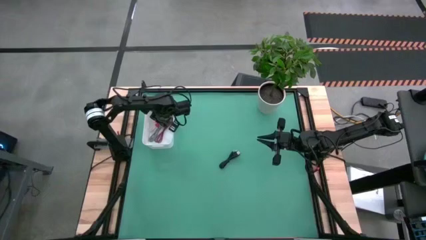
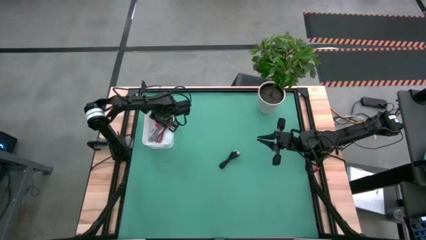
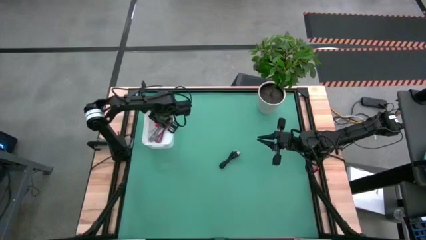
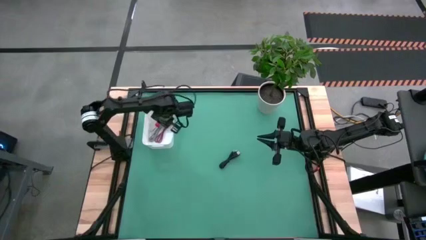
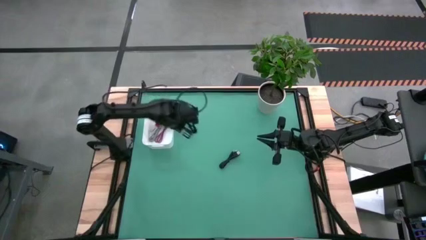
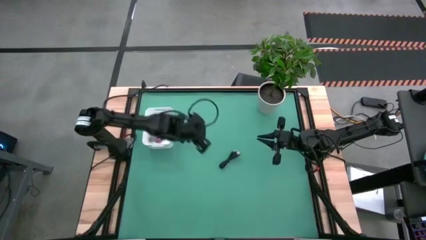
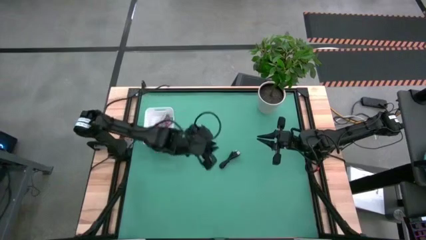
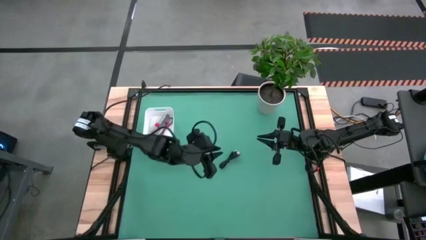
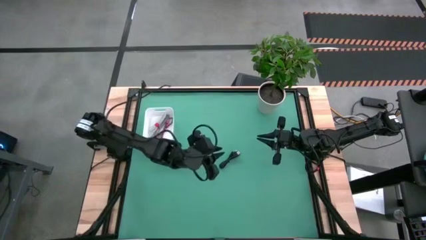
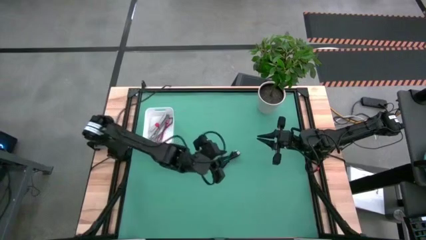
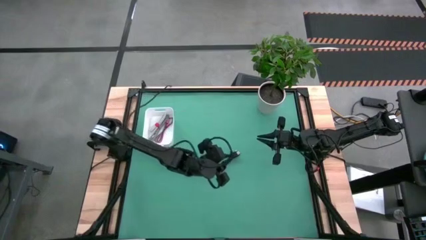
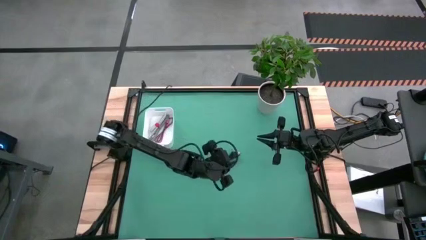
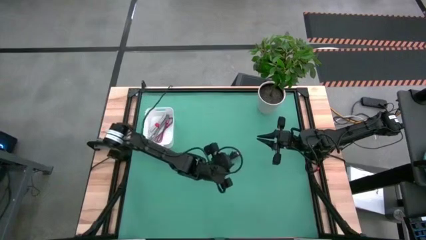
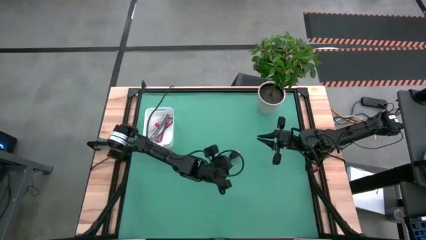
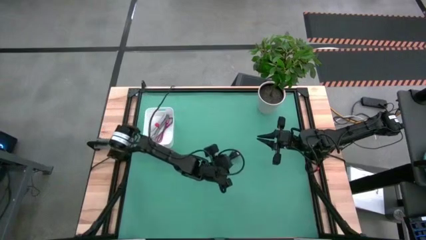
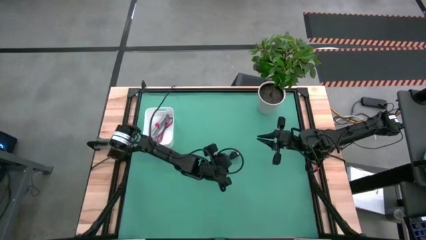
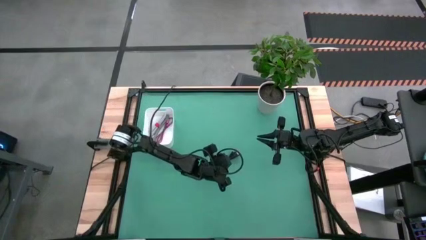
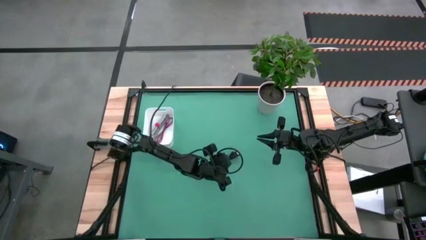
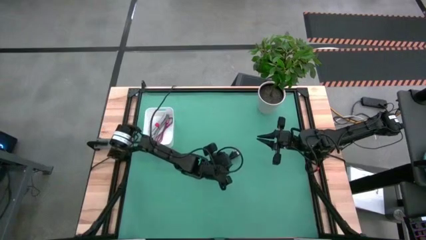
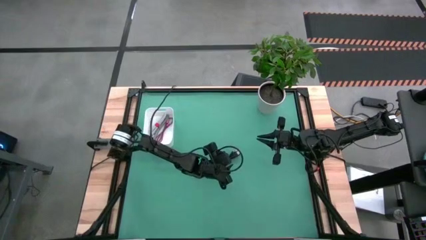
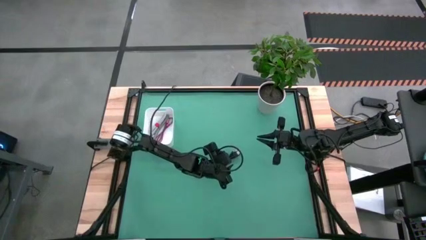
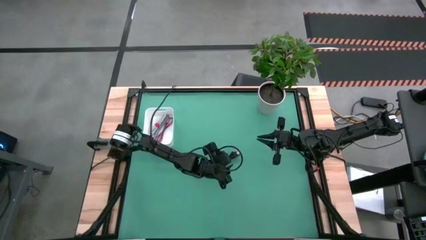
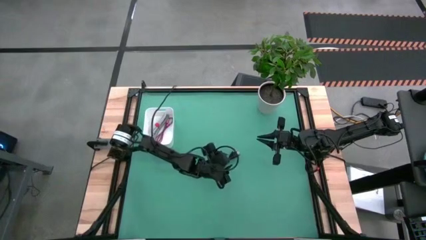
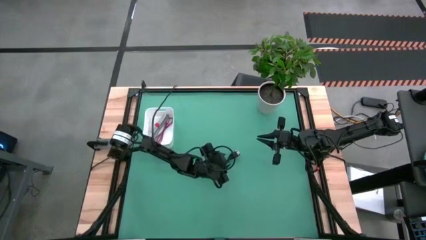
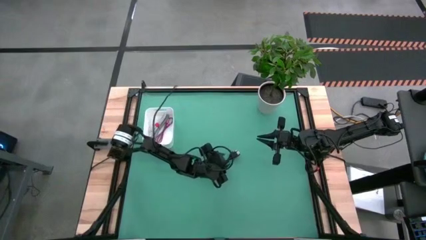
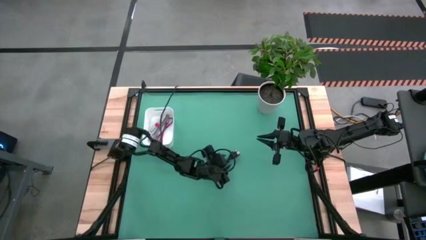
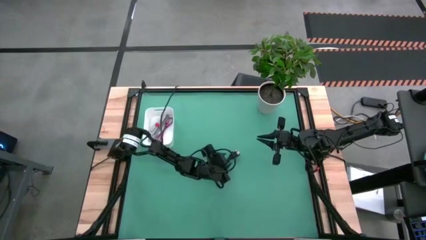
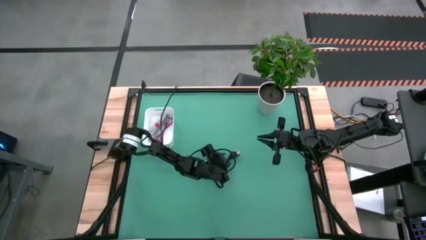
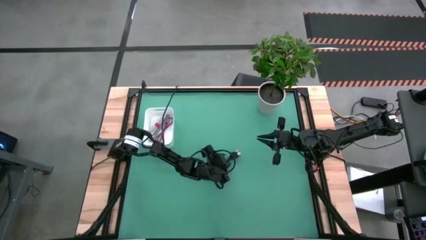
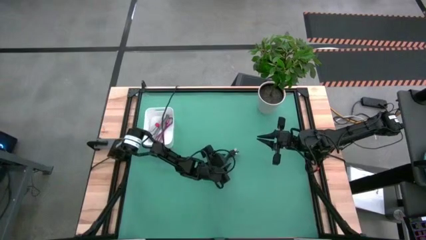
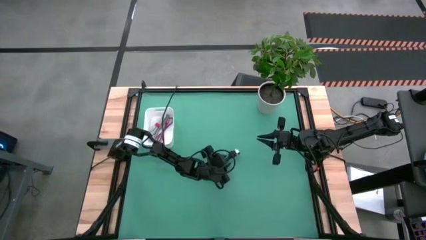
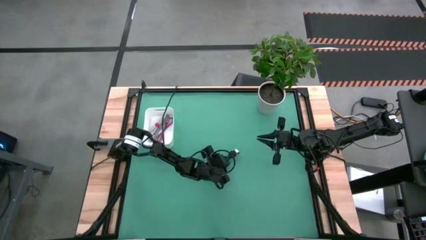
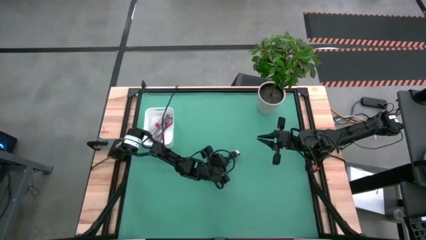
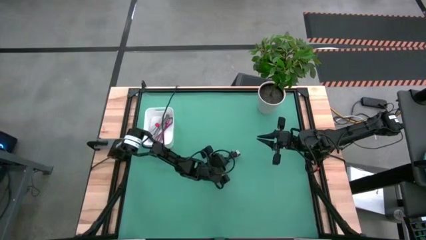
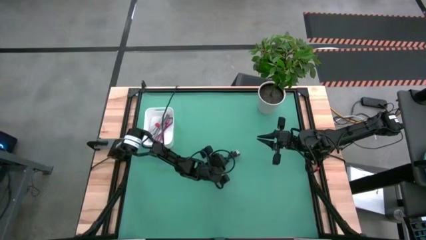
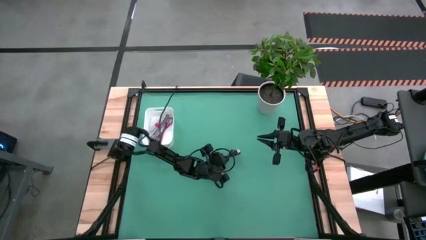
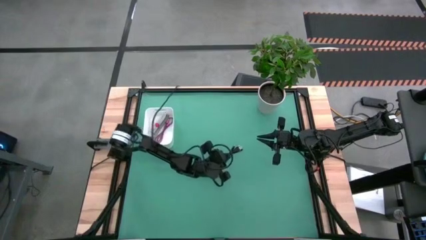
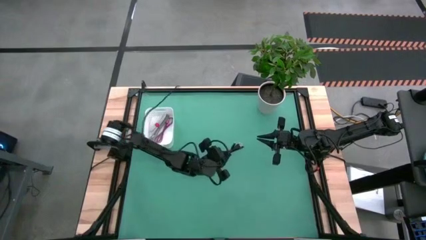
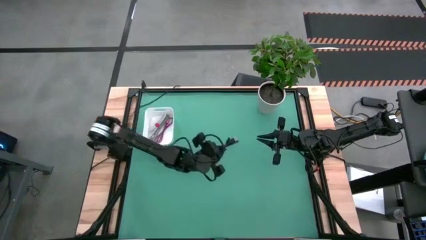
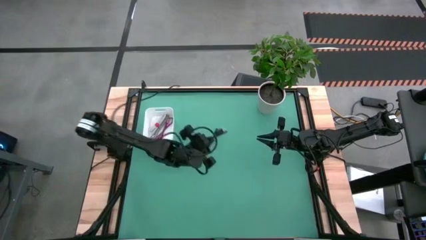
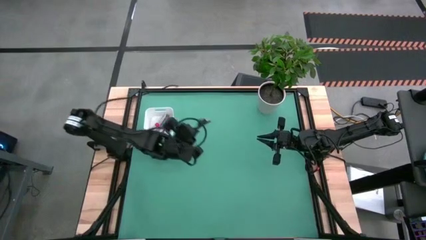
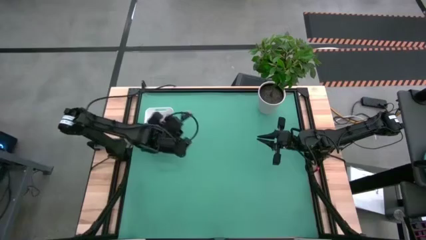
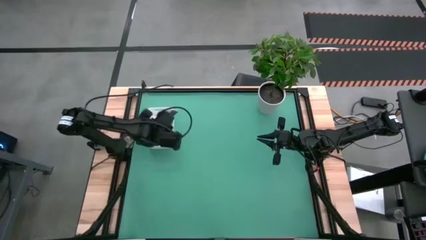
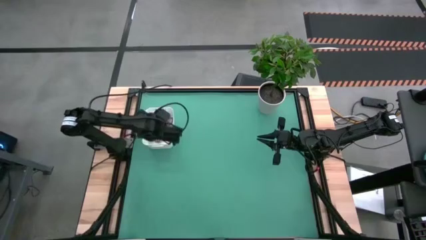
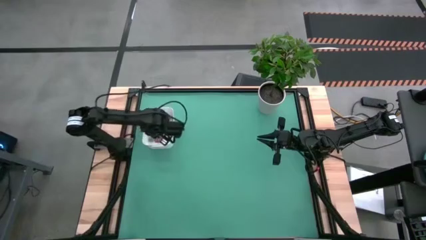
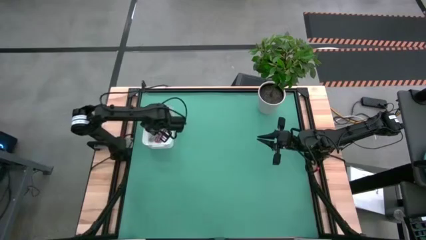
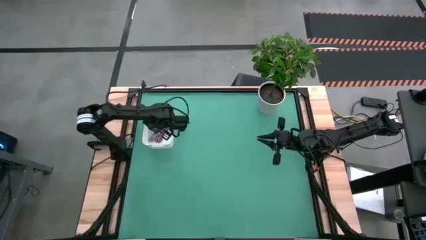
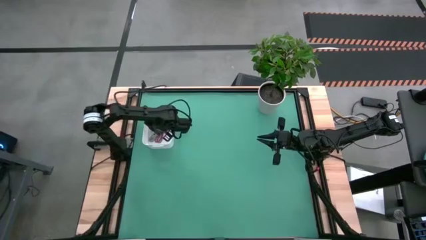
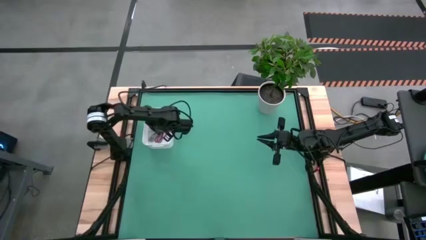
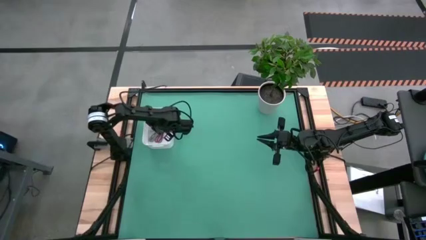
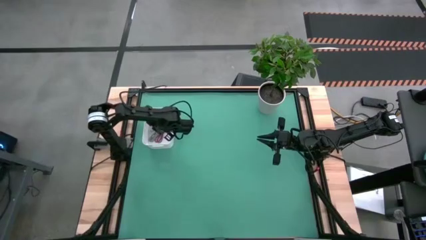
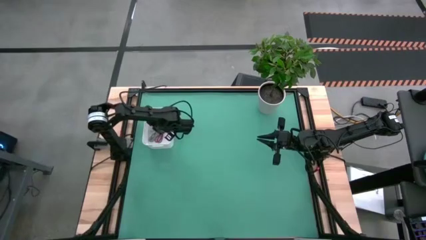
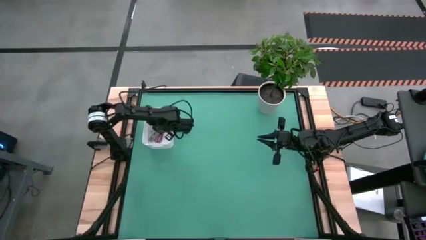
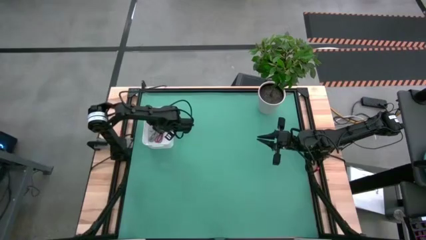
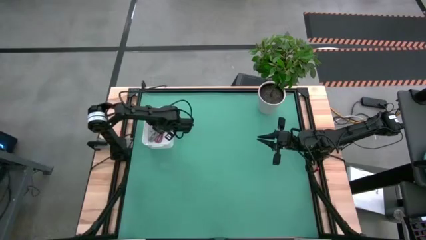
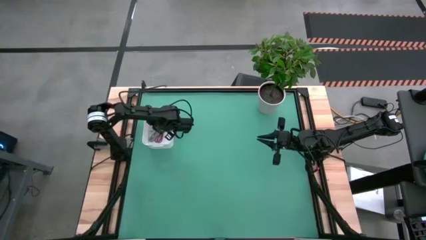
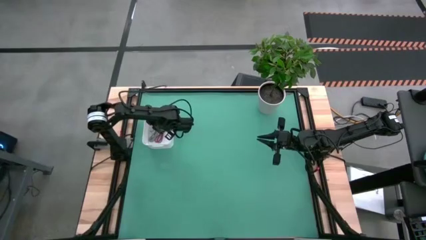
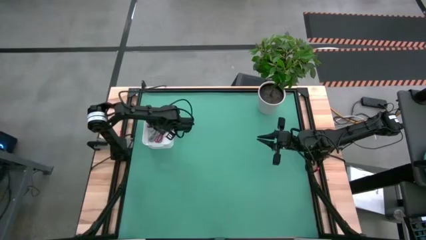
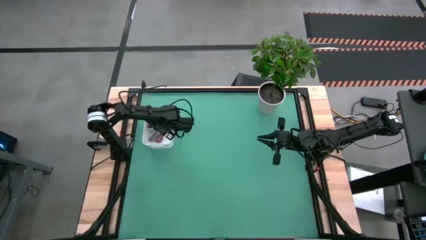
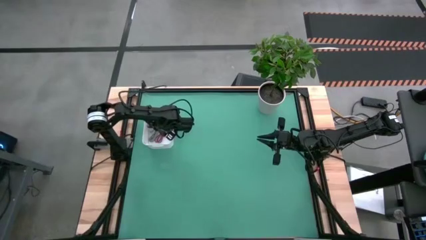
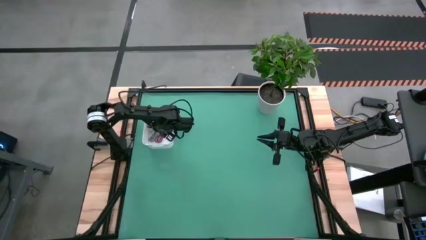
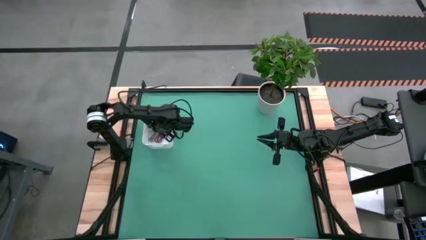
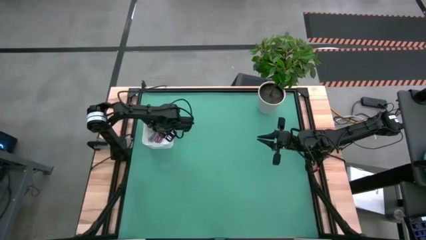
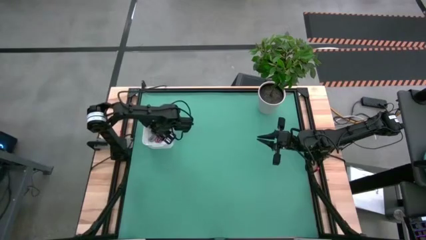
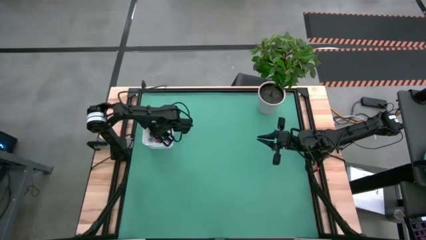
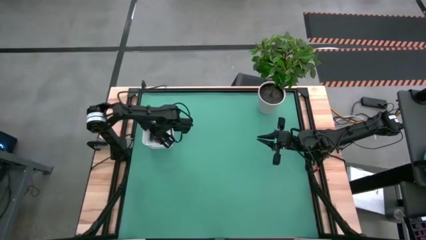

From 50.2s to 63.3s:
Task: Pick and place USB-C Cables
Put the black charger cable into the white bin

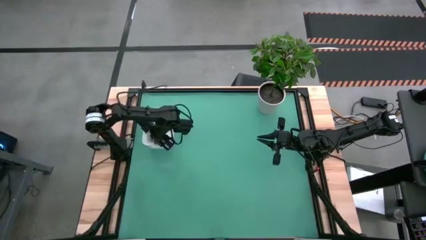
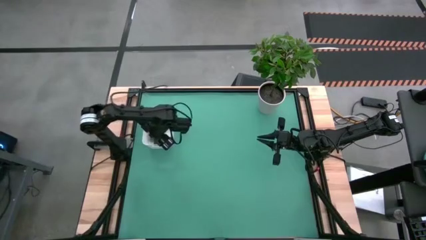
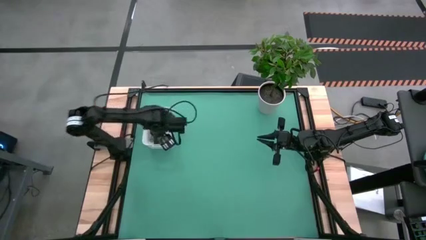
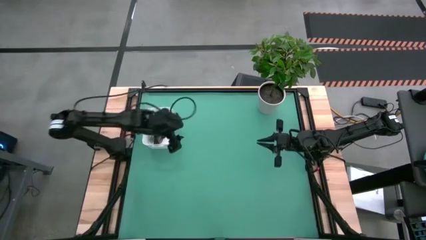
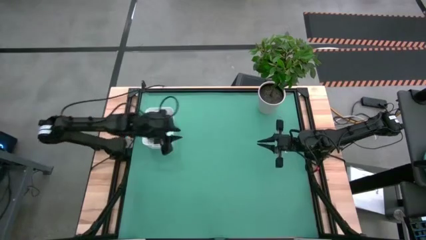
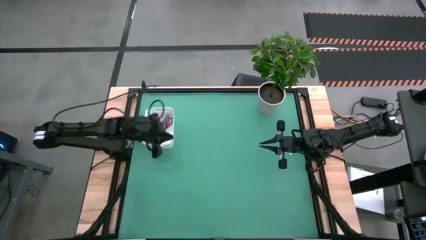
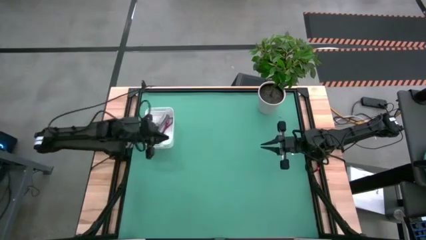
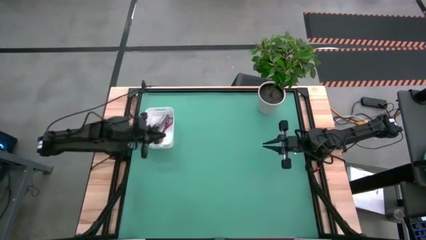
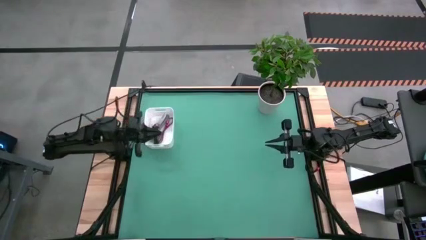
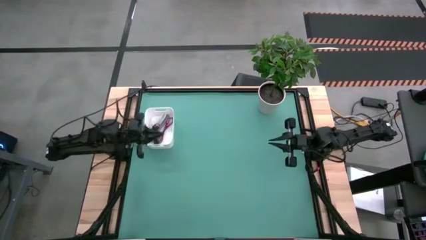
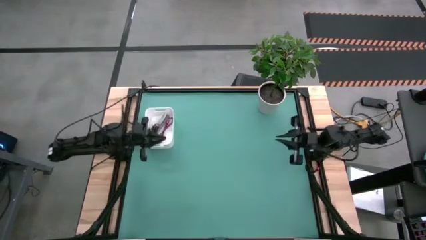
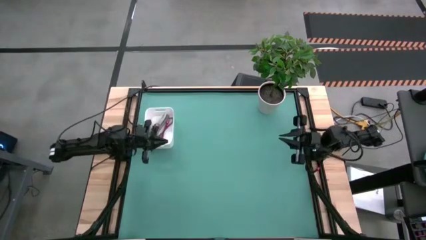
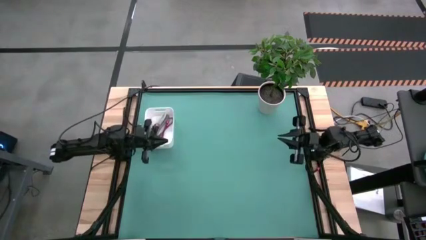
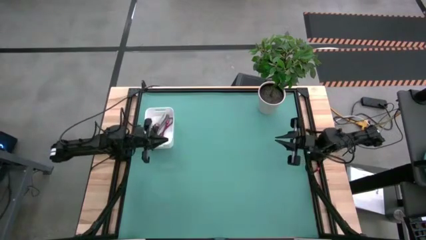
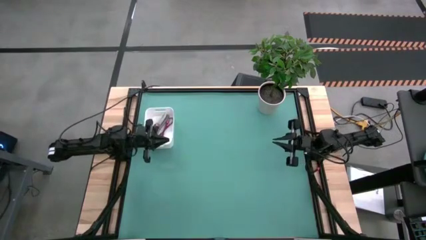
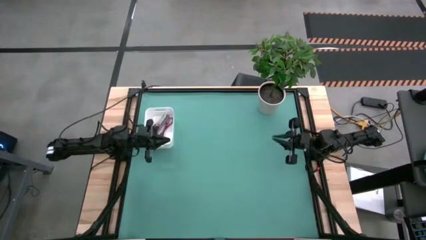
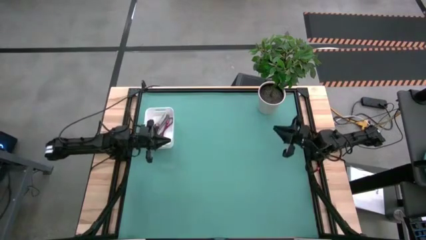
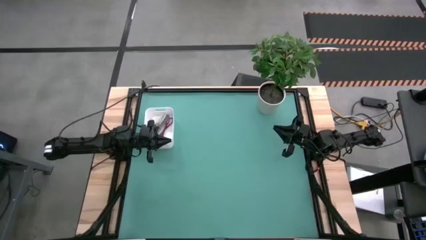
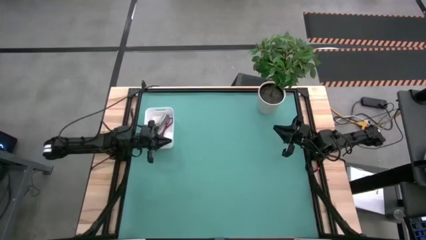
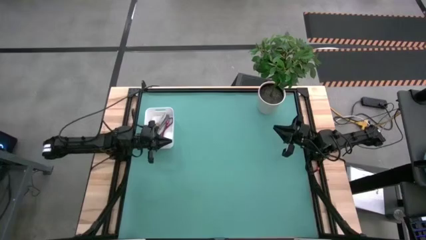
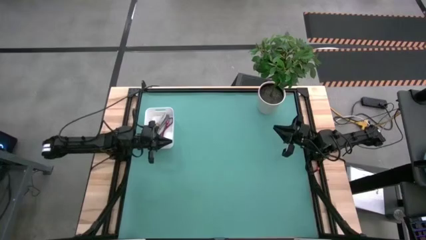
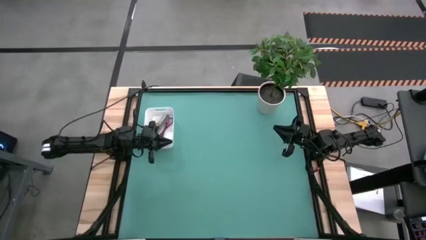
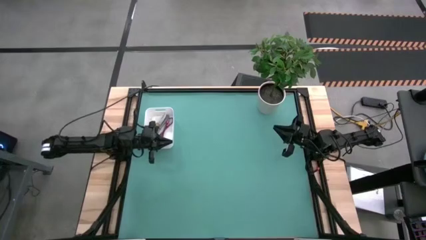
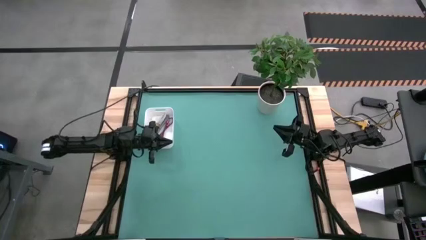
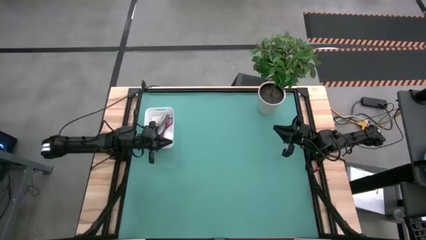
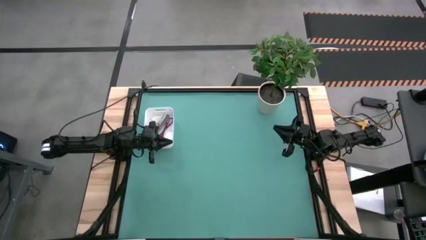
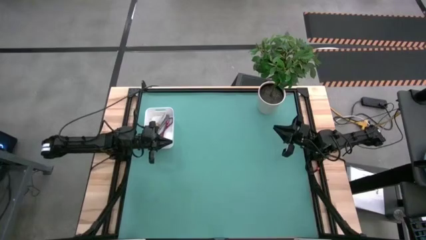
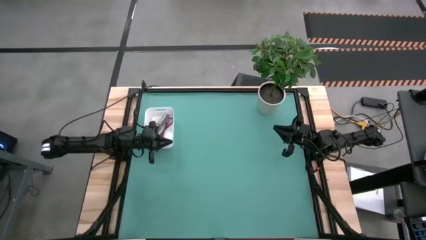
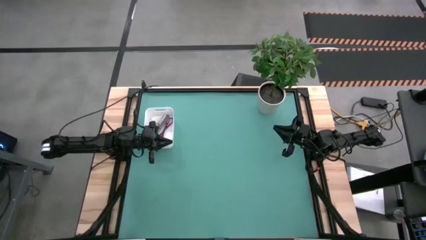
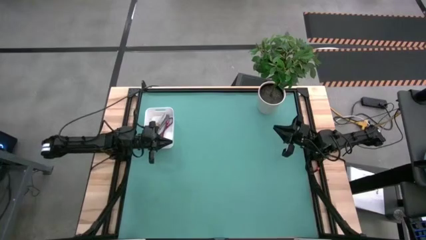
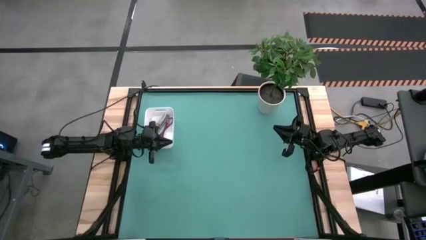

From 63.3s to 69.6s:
Return to Home Position
